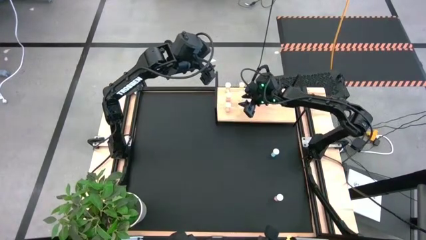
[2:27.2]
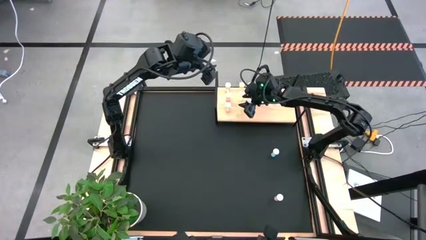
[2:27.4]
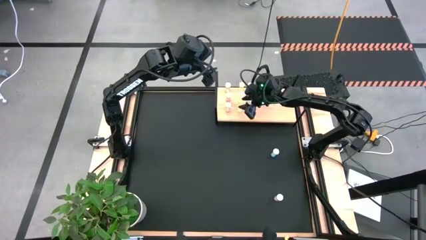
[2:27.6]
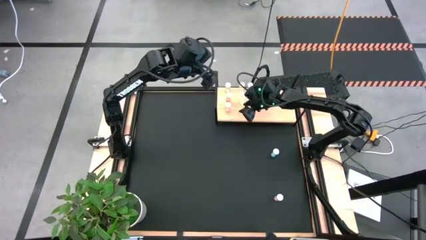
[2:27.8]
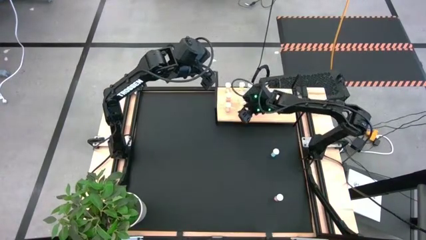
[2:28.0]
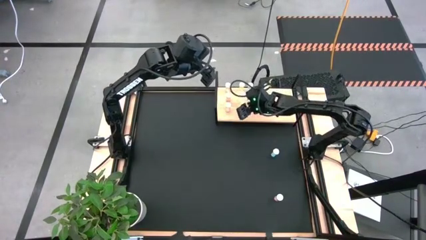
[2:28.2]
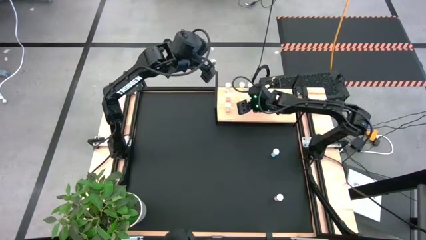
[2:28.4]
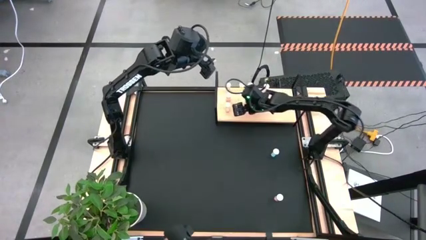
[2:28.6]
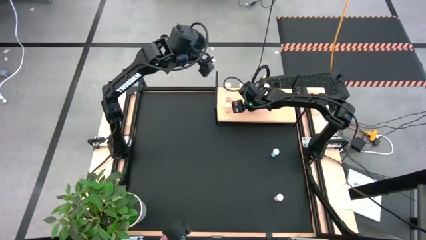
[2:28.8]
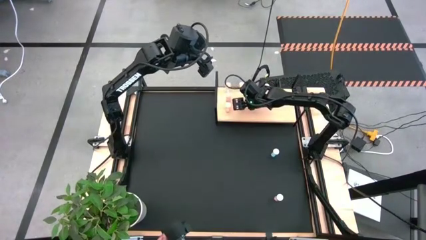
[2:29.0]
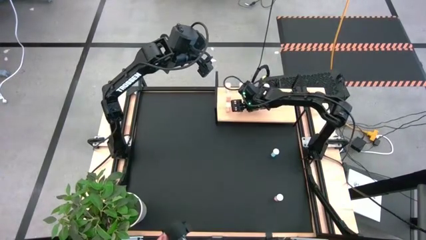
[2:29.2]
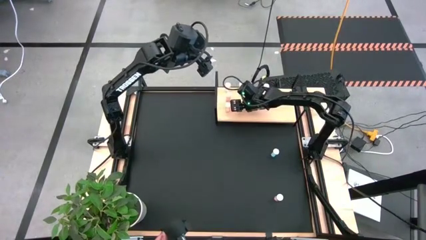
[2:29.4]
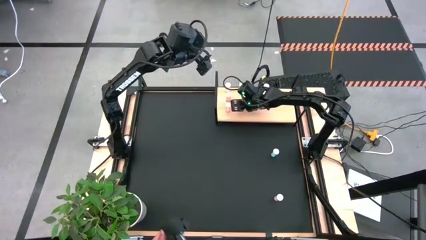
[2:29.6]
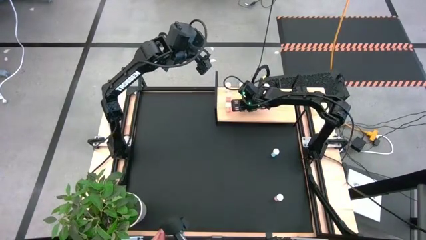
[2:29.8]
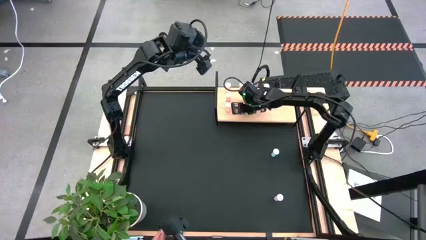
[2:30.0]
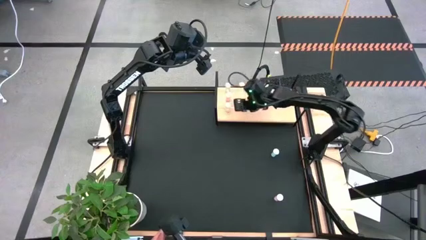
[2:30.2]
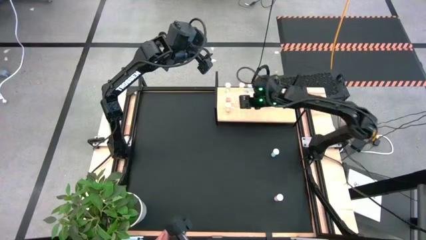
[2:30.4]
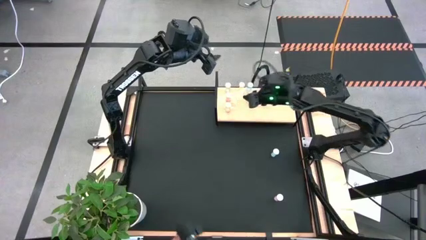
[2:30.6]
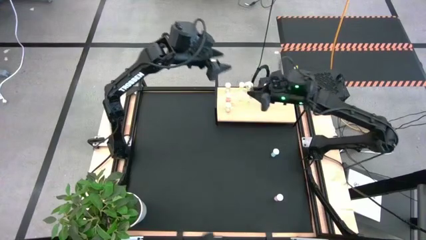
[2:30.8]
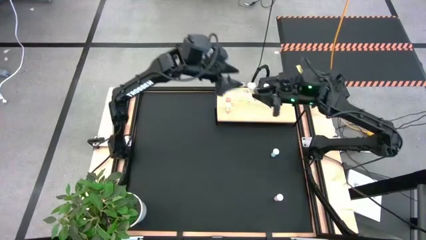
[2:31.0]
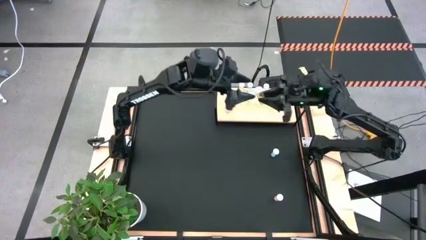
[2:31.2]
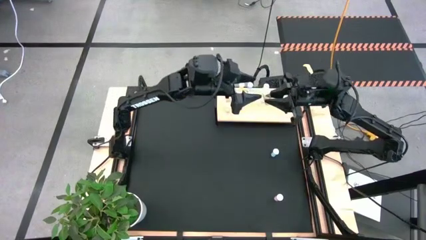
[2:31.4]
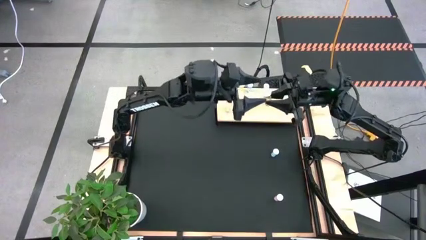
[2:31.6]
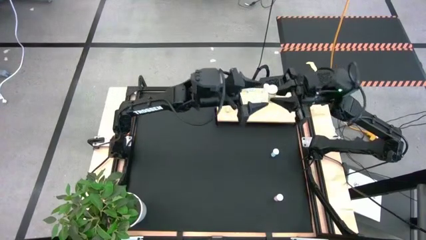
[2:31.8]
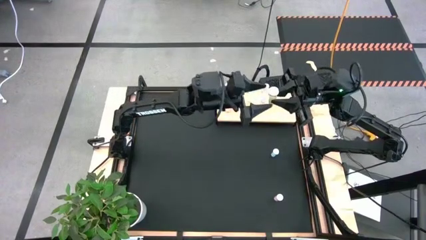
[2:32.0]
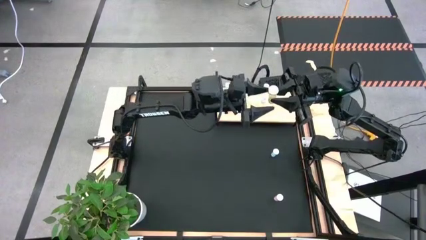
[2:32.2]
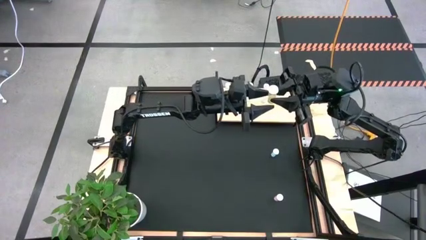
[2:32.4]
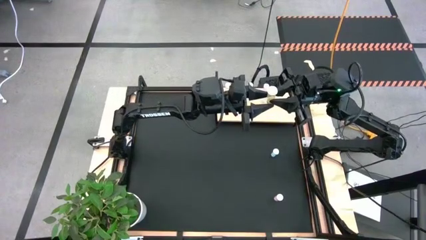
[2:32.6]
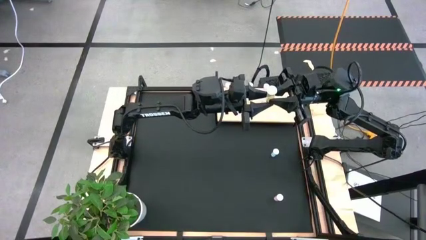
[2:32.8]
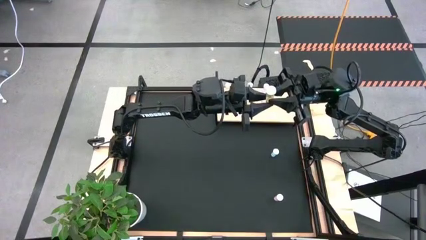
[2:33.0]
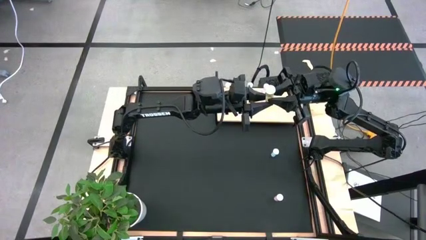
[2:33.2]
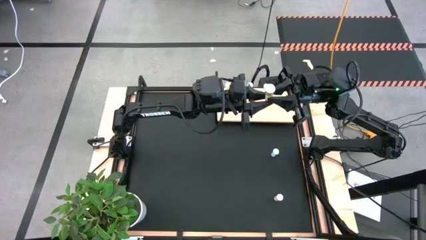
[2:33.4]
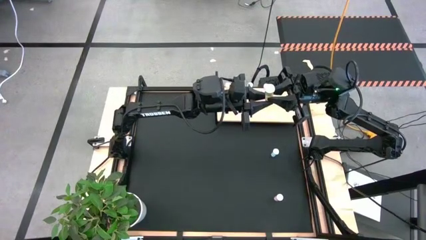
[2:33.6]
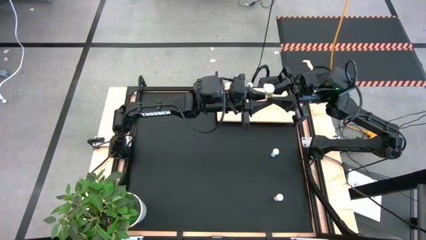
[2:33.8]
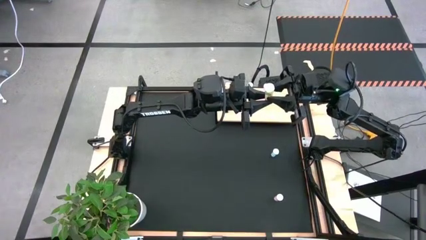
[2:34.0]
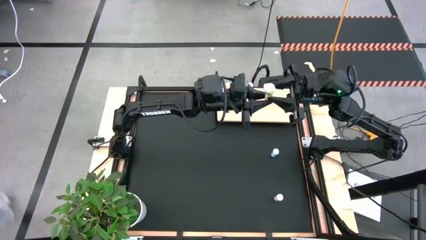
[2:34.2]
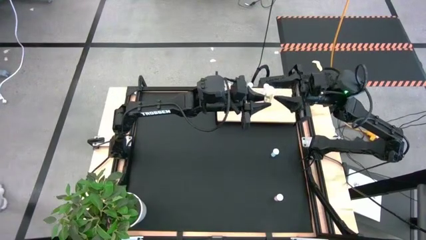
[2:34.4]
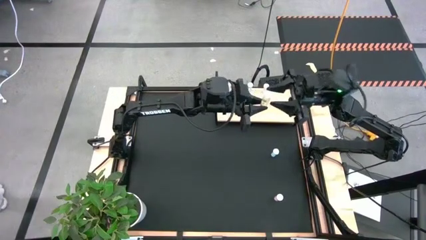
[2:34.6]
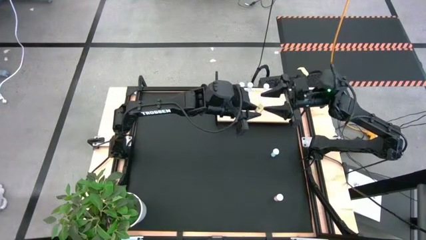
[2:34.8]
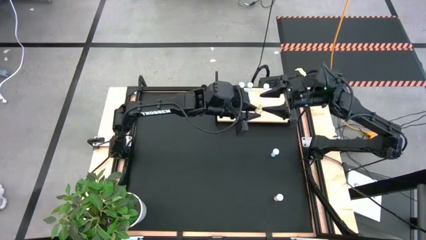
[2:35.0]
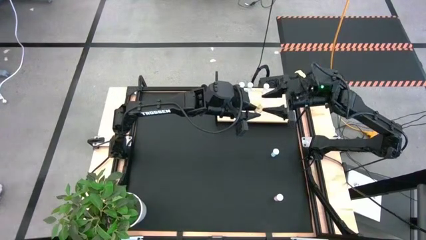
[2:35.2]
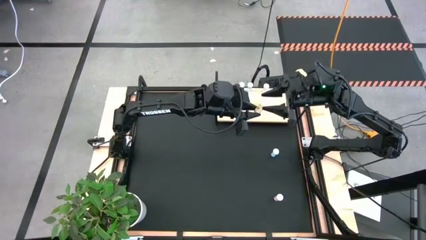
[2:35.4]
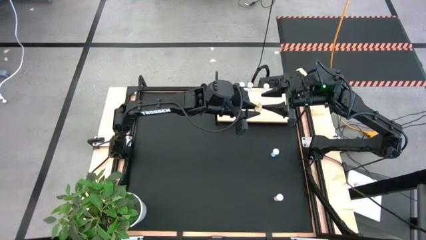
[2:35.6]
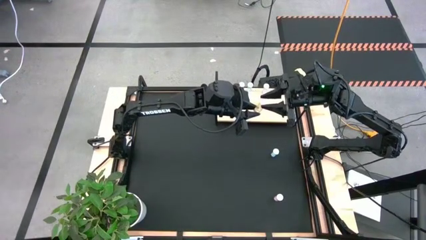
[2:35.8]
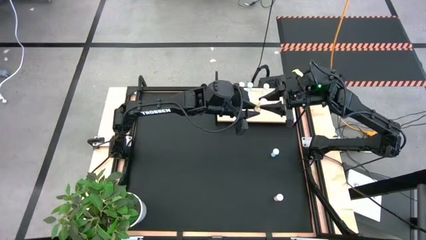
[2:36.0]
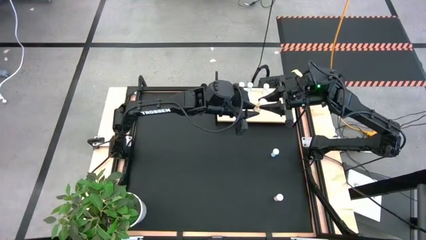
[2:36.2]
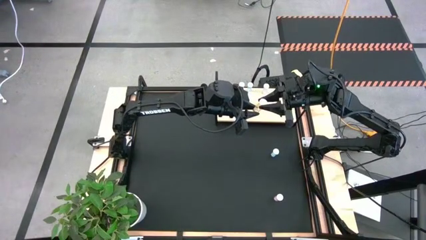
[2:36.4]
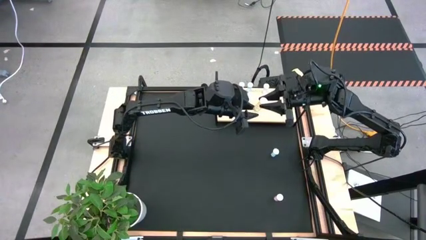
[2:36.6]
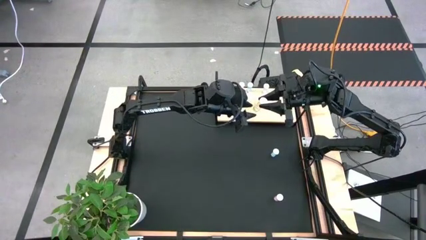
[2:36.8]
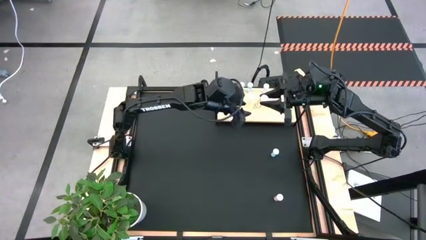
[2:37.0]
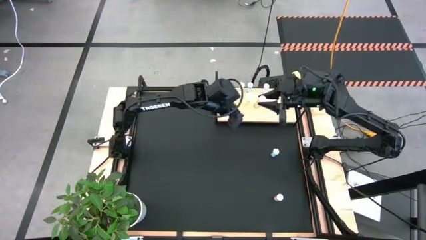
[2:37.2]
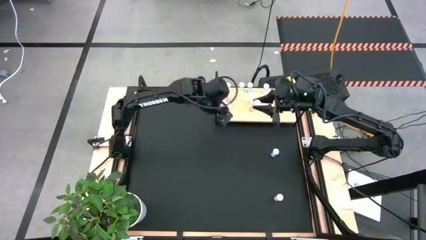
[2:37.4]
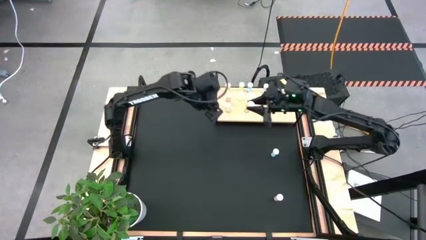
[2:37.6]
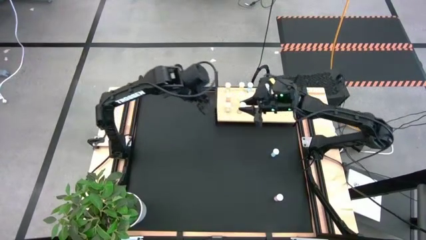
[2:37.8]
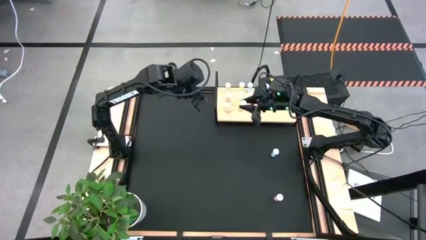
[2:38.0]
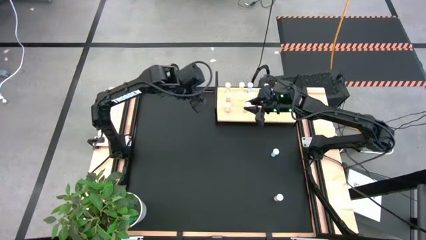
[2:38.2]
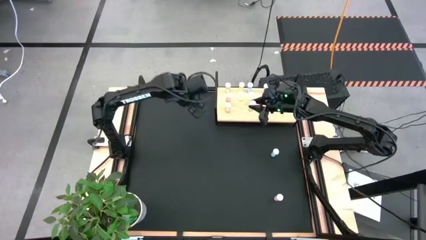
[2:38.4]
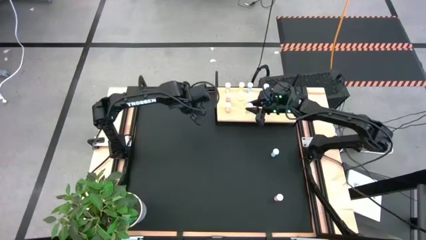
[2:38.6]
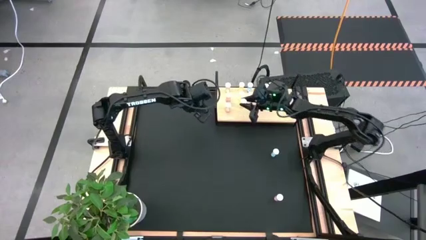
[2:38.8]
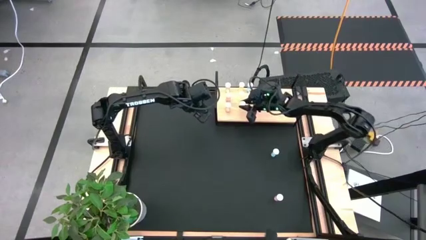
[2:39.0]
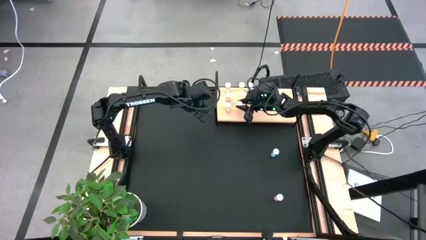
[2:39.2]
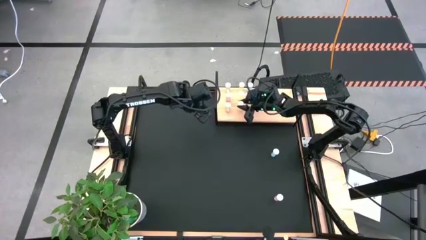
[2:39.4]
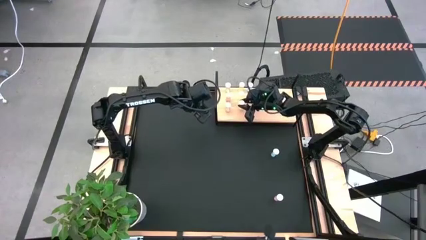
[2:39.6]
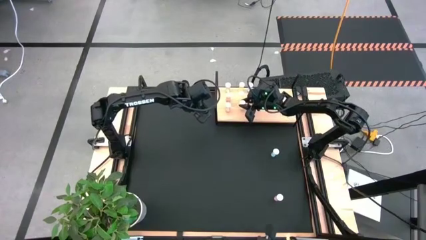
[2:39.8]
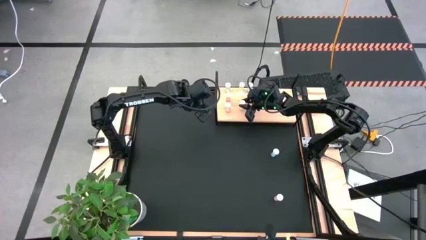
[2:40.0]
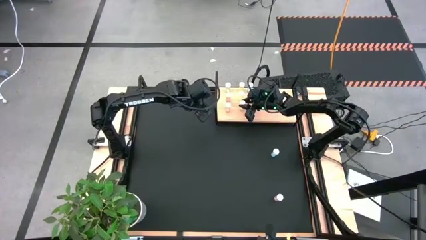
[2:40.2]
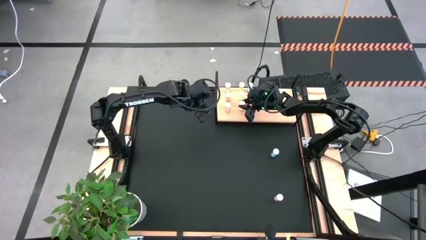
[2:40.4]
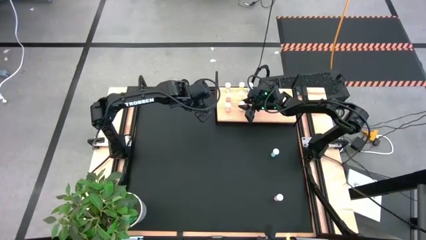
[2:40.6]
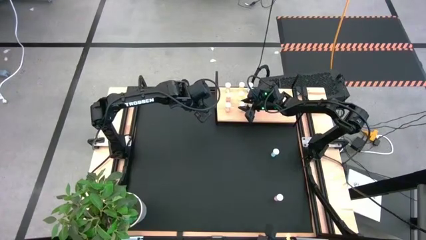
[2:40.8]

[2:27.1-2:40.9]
Task: Pick and place medicine bottles onto shelf by color
Put the yellow pill bottle aligned with the other yellow pill bottles on the shelf
